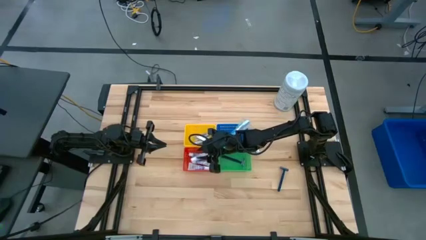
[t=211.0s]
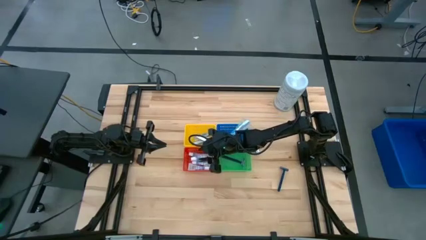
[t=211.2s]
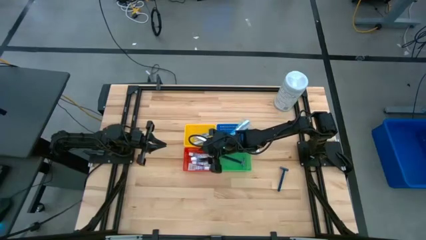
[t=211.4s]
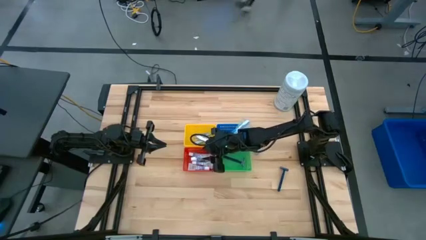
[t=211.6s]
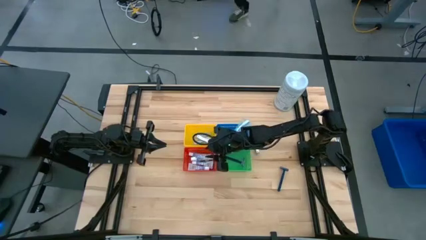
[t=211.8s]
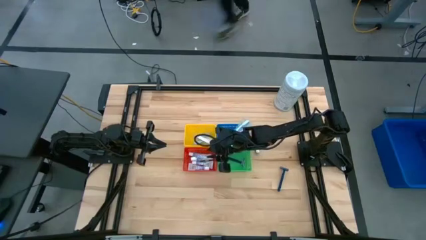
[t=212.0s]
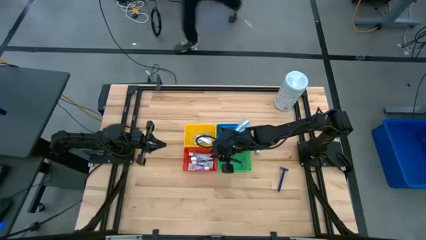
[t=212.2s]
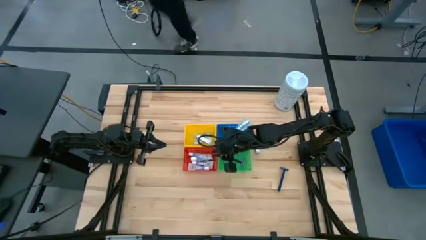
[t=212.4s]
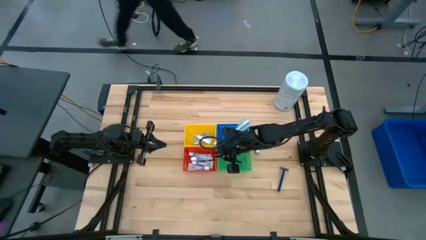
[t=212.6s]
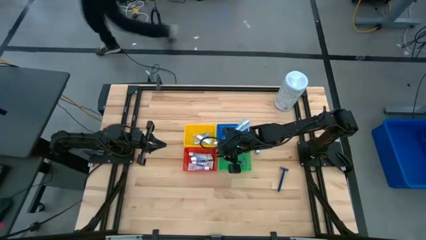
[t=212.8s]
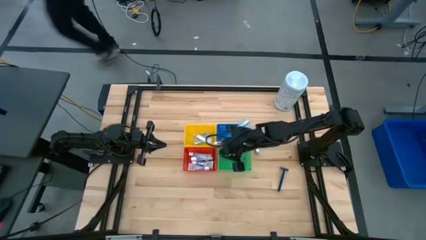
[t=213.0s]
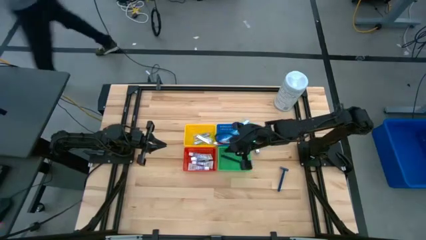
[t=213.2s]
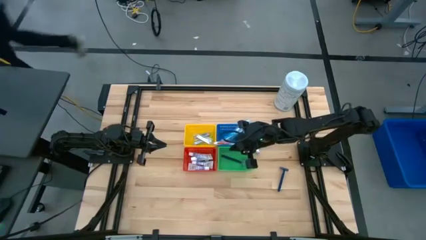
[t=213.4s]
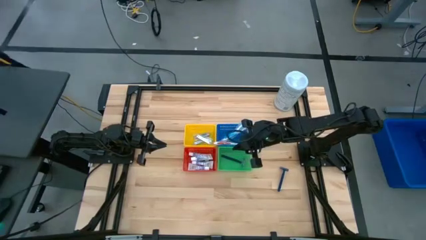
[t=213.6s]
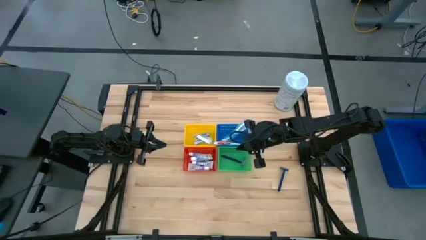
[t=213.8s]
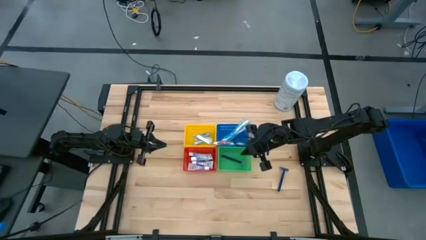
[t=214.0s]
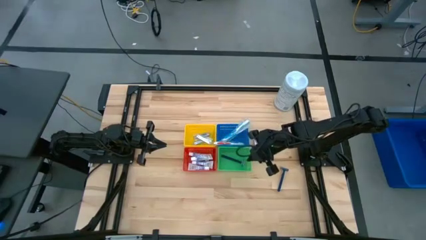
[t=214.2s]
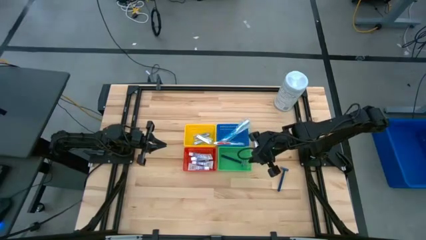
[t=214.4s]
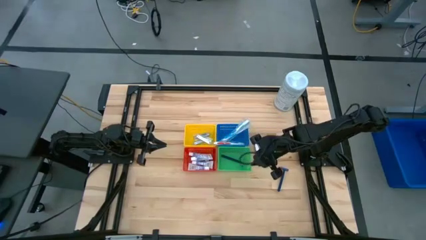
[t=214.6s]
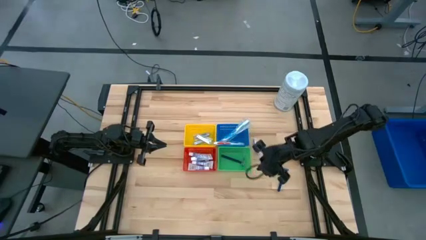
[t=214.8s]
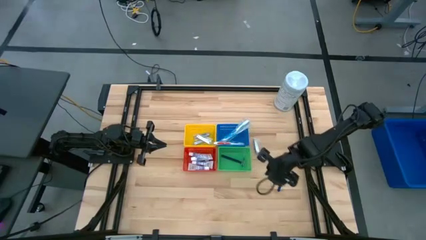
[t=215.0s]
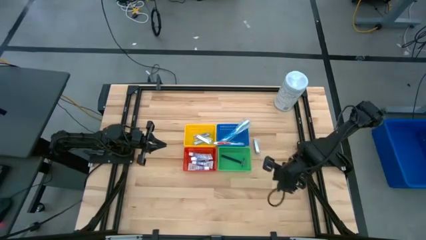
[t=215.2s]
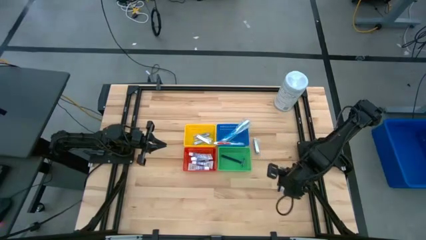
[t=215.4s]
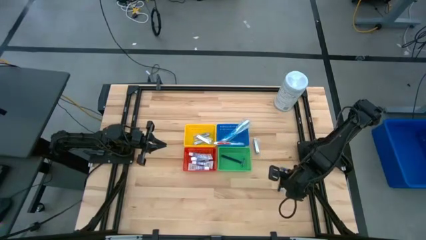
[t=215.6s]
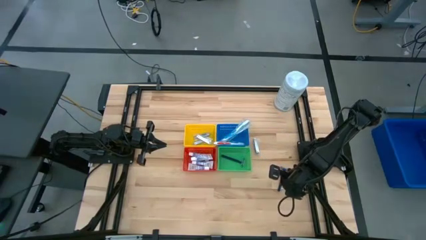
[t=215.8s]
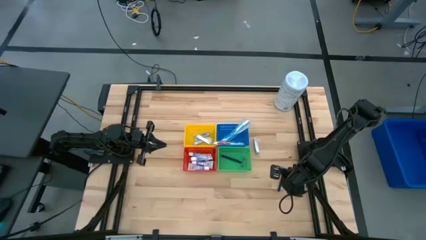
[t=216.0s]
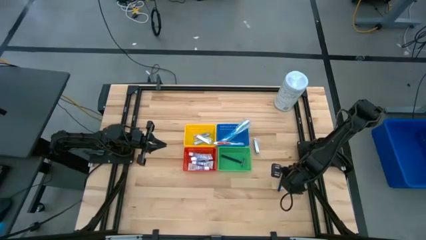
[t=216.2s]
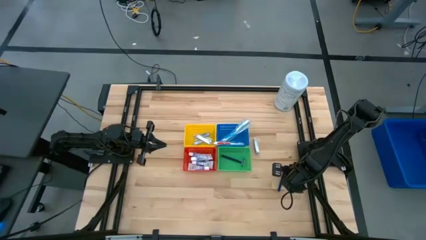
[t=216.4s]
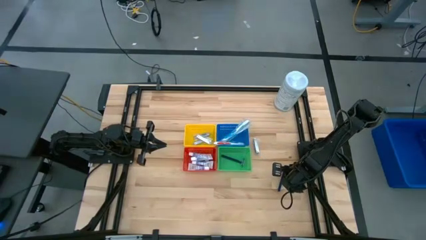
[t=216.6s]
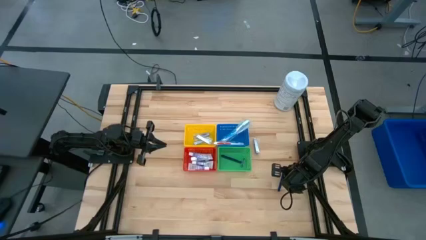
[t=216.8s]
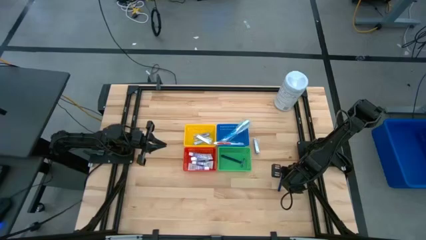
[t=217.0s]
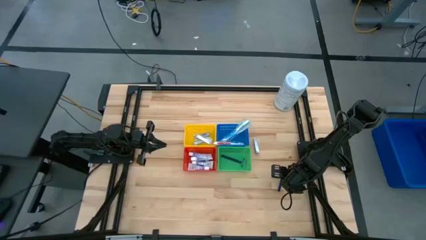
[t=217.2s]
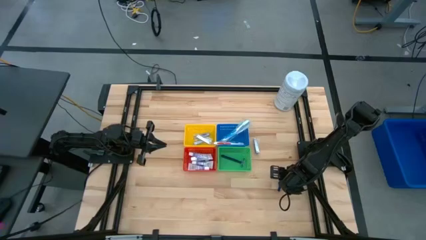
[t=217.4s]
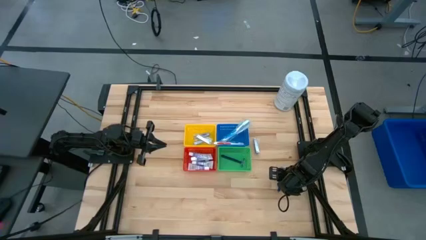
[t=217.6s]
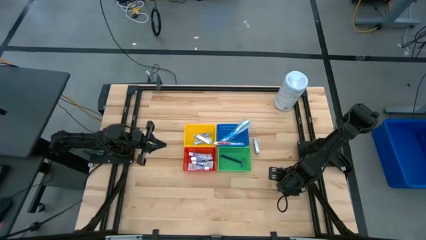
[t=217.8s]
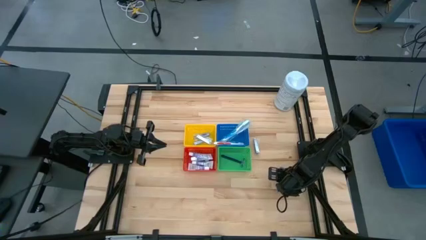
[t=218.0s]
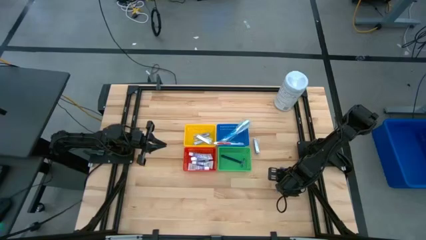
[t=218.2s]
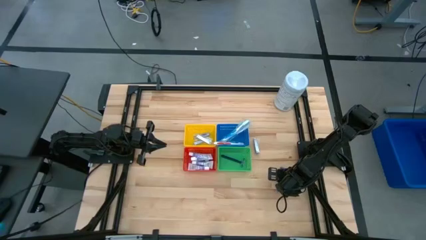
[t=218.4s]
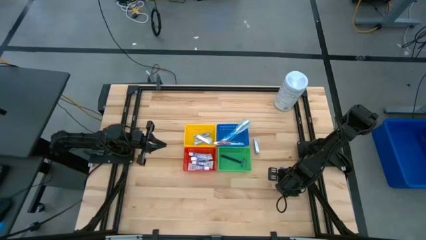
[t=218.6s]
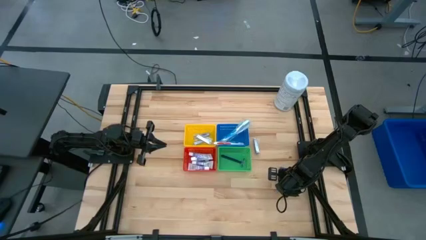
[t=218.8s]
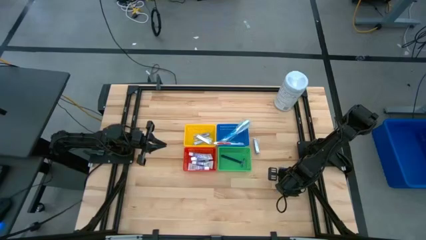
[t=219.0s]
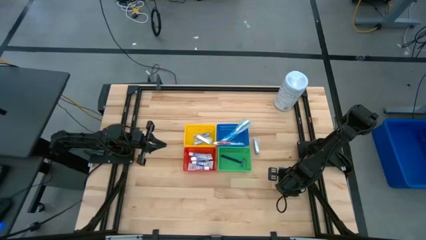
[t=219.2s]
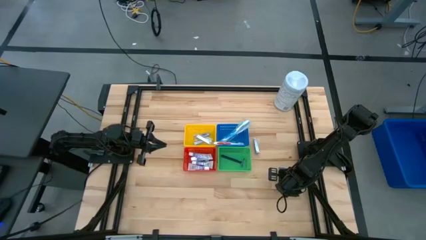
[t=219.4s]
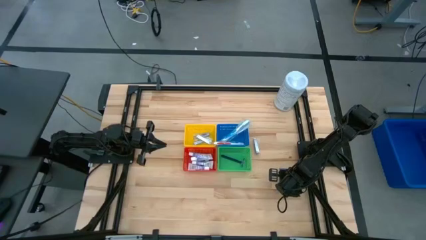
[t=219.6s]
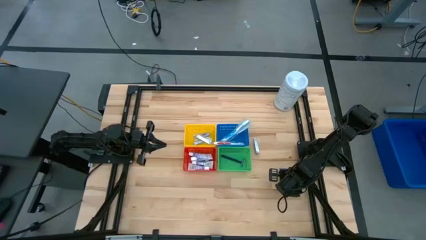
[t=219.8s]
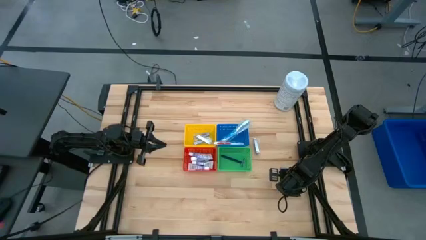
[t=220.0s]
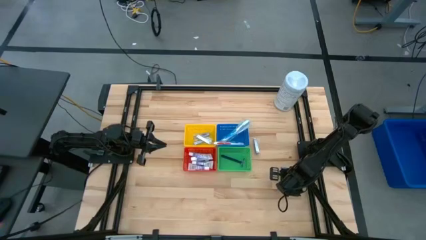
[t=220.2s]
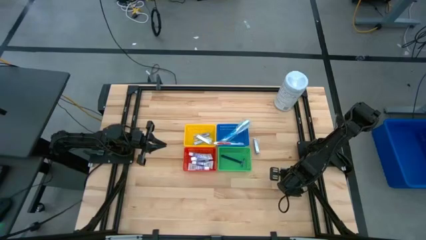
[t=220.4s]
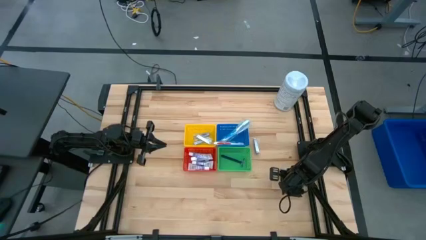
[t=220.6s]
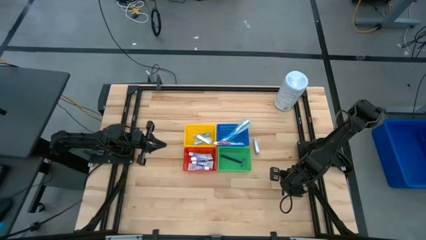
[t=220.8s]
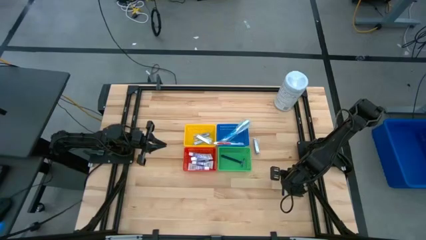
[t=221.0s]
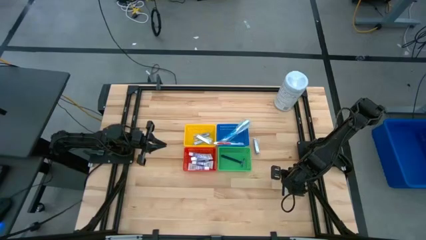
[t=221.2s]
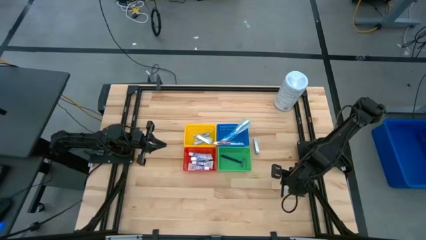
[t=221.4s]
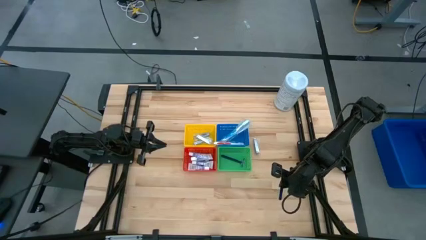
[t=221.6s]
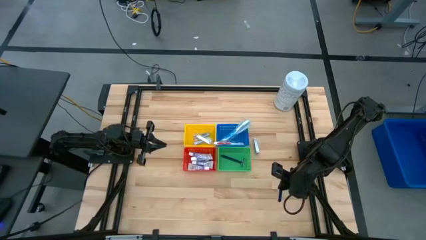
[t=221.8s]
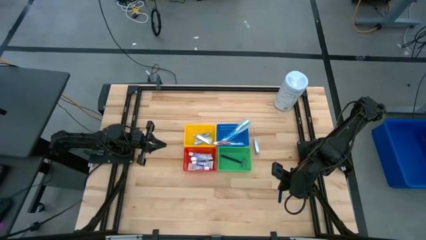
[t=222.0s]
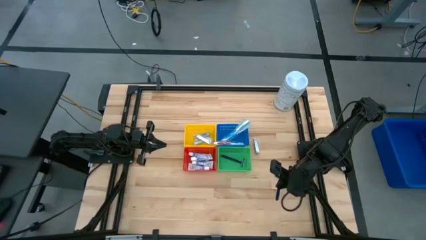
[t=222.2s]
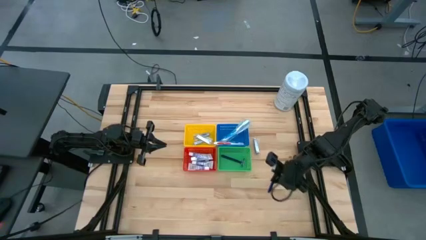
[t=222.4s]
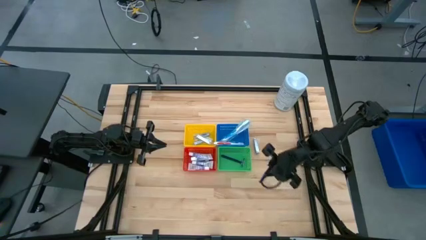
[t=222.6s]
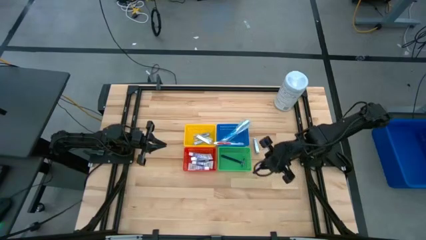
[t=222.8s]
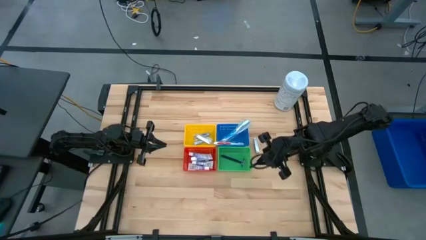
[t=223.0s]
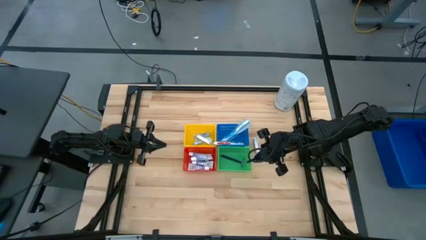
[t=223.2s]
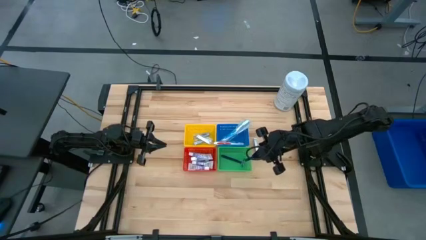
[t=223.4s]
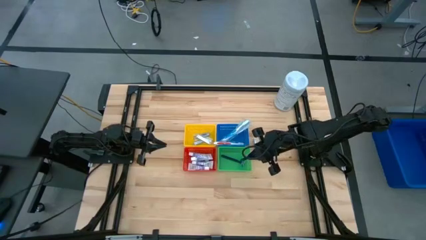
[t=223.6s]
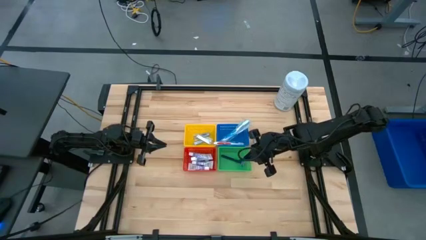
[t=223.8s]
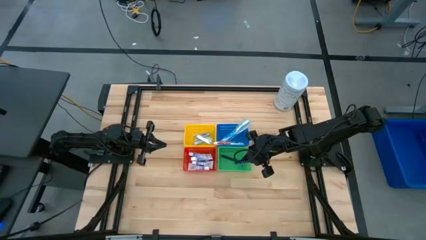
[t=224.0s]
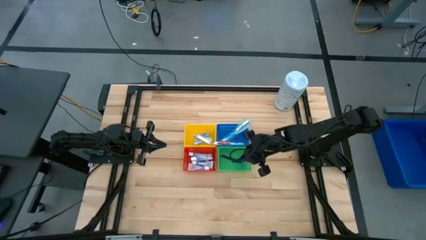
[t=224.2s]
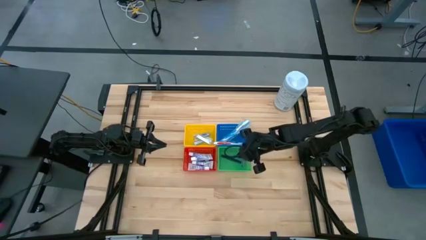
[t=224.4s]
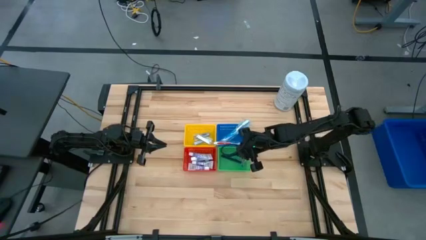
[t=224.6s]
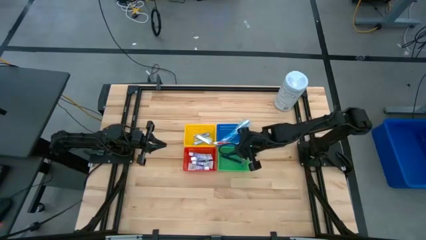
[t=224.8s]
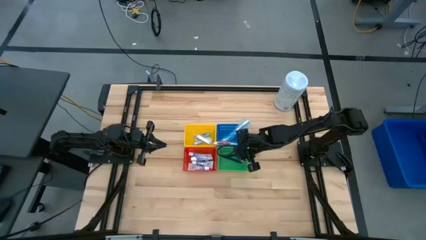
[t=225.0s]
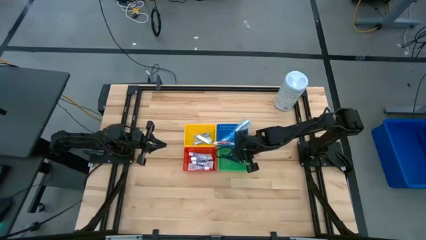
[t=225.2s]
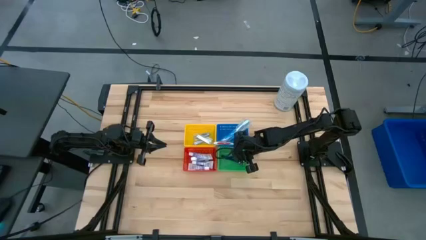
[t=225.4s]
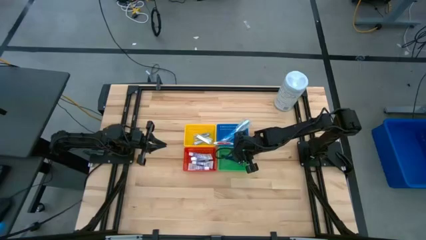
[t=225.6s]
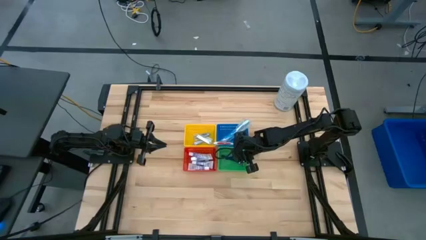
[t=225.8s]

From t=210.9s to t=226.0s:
Task: Pick & Place Travel size toiletries
Put the shaver into the green bin

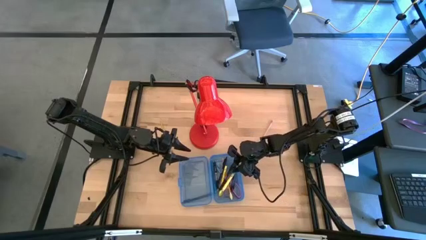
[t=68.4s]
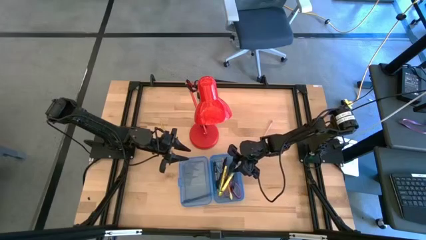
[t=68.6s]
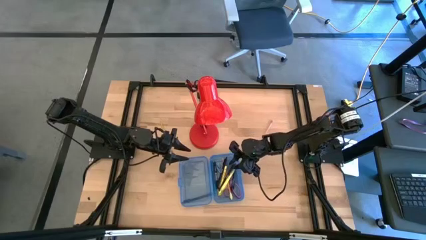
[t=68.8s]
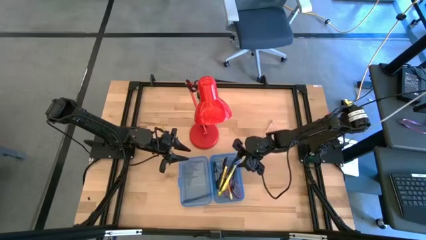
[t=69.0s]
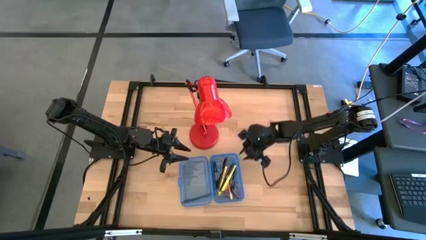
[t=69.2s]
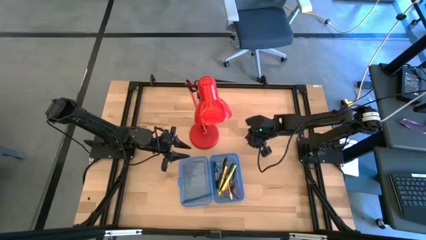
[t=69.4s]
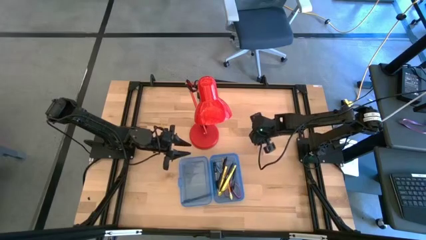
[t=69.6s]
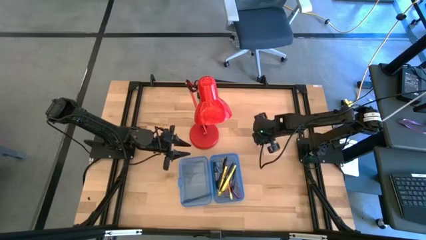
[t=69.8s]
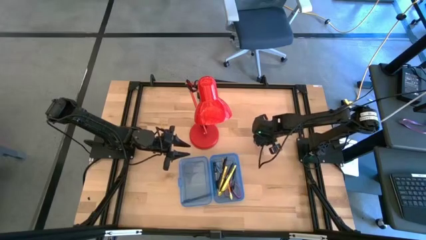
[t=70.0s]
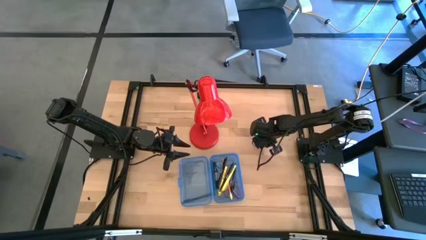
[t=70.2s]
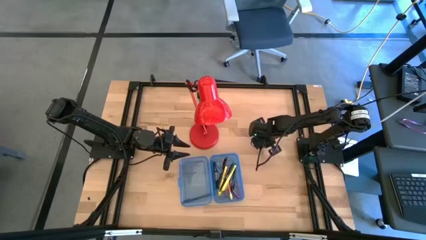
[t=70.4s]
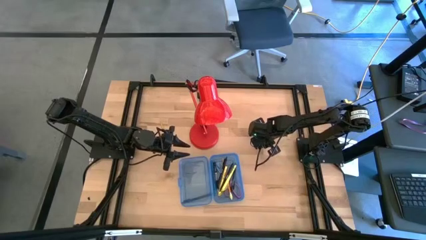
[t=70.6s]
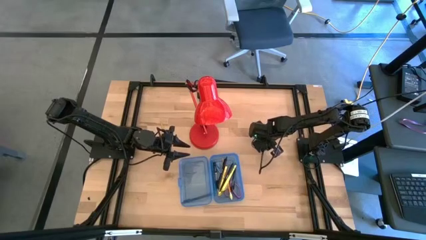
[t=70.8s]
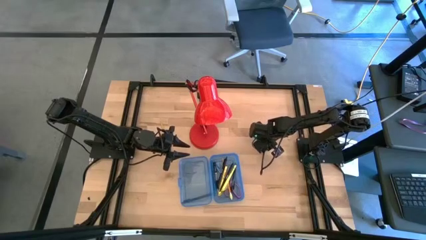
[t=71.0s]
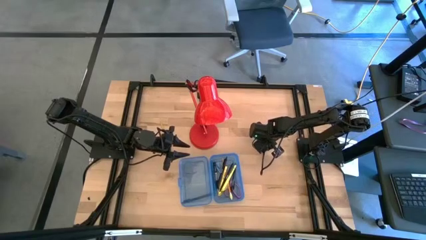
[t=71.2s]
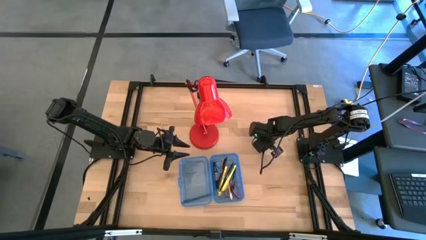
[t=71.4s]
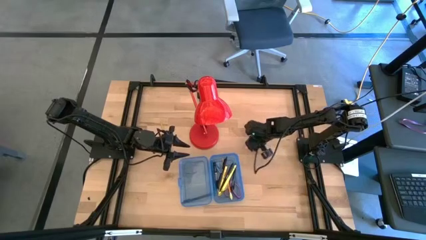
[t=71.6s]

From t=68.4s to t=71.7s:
Task: Pick & place school supplies into a supply box
Put the pink pencil into the blue supply box
